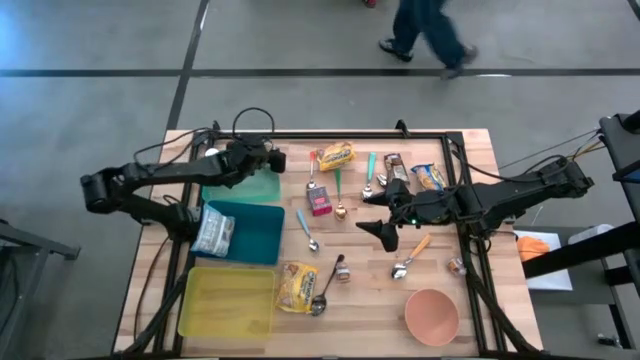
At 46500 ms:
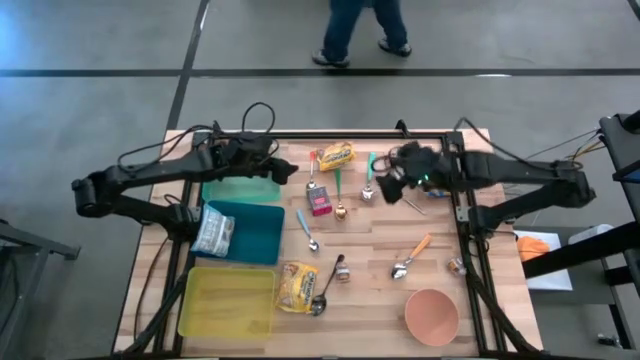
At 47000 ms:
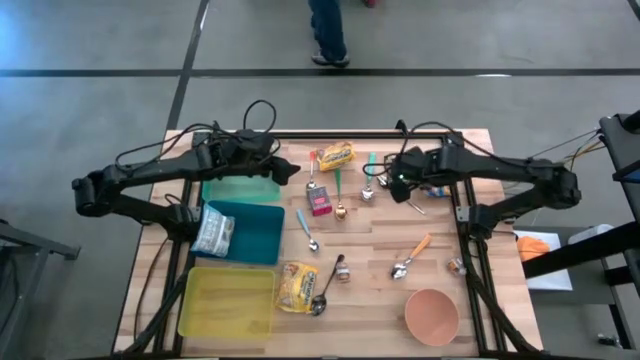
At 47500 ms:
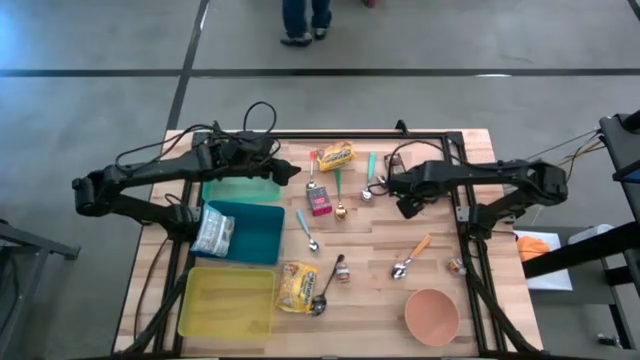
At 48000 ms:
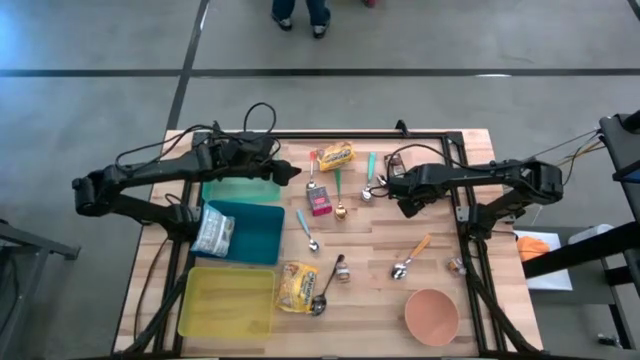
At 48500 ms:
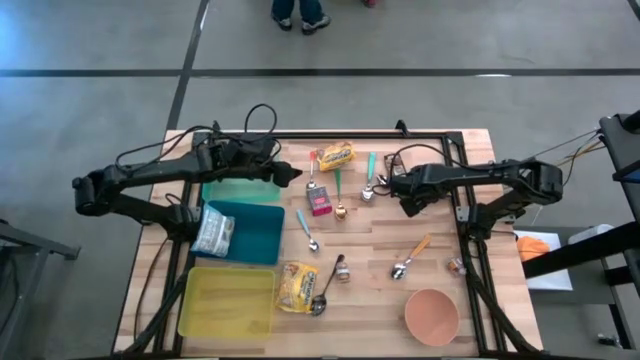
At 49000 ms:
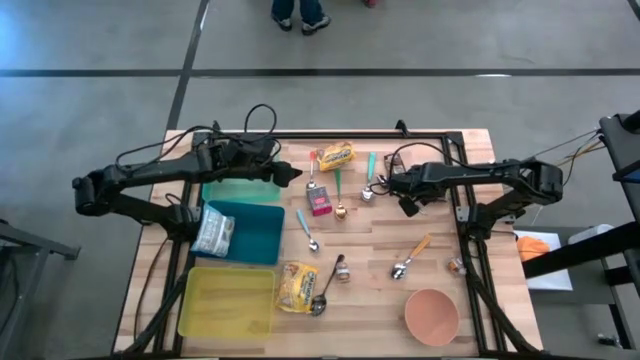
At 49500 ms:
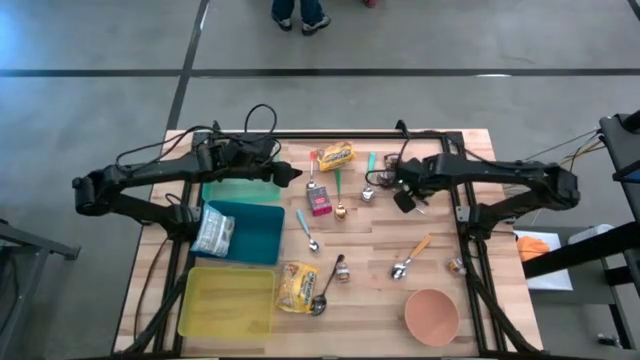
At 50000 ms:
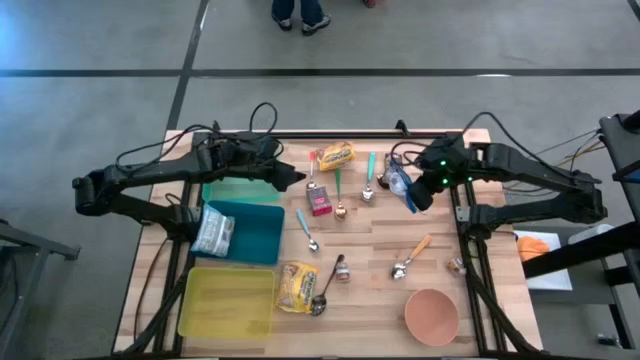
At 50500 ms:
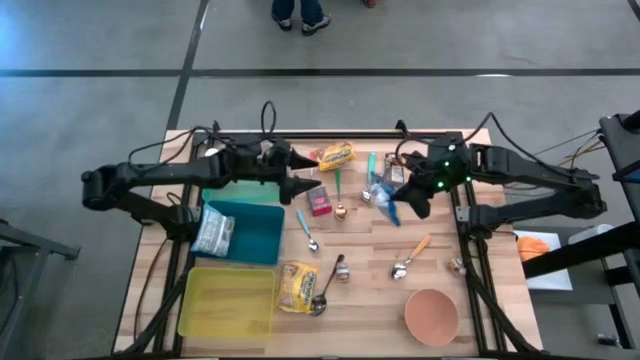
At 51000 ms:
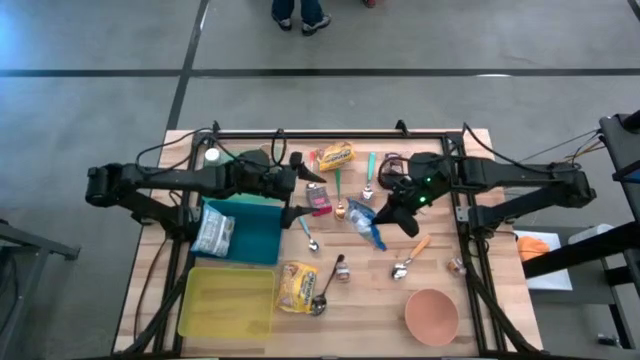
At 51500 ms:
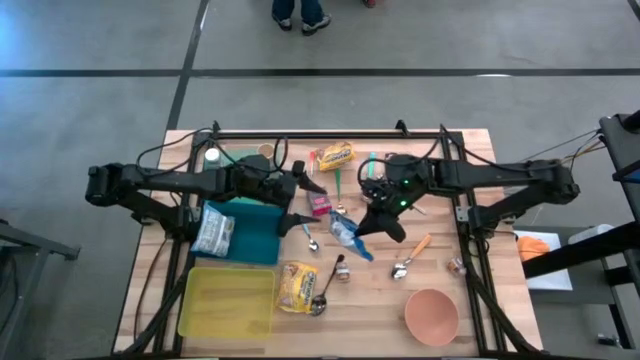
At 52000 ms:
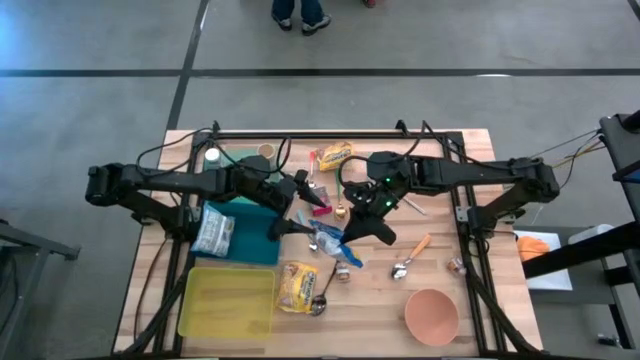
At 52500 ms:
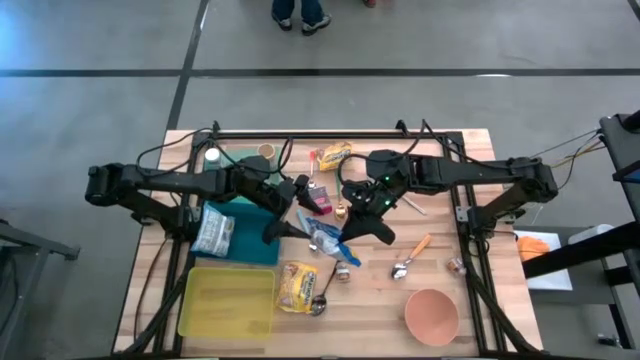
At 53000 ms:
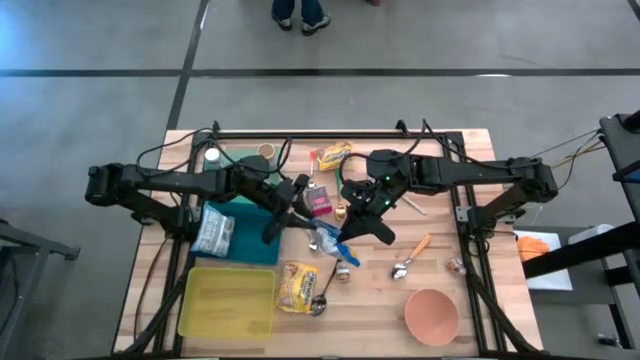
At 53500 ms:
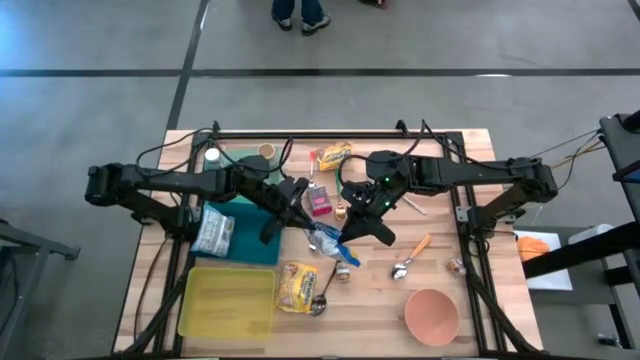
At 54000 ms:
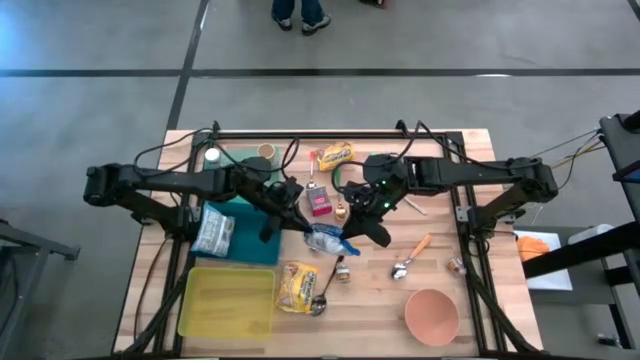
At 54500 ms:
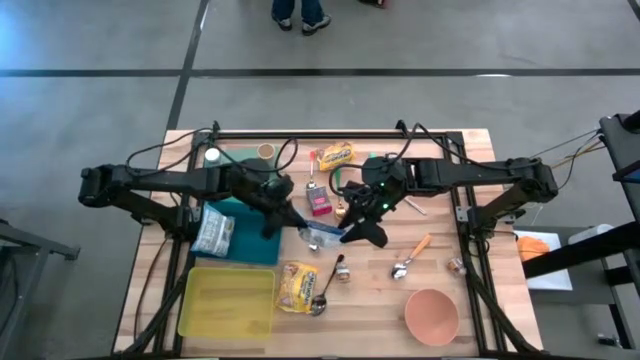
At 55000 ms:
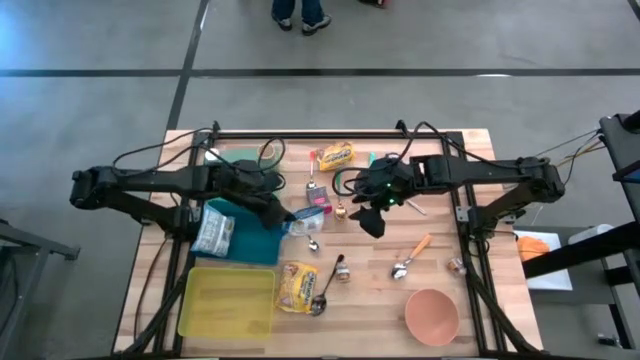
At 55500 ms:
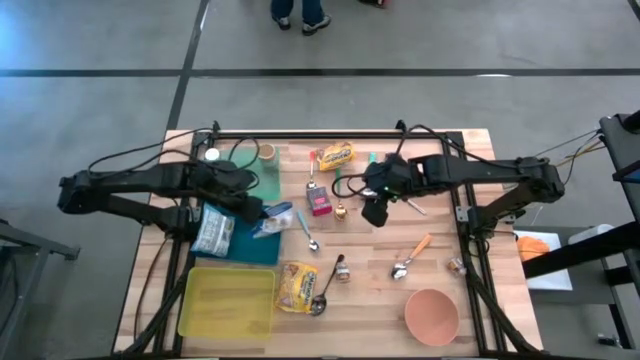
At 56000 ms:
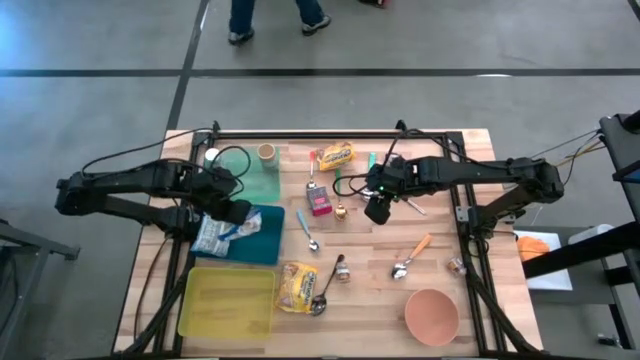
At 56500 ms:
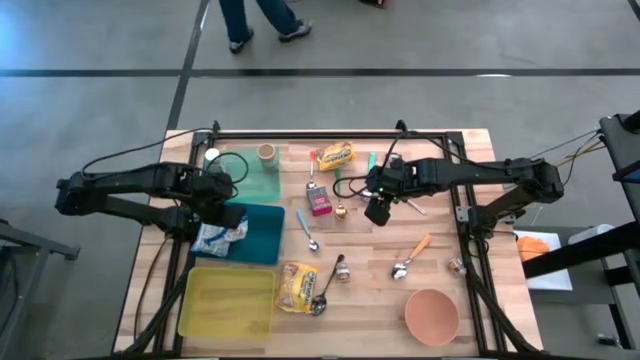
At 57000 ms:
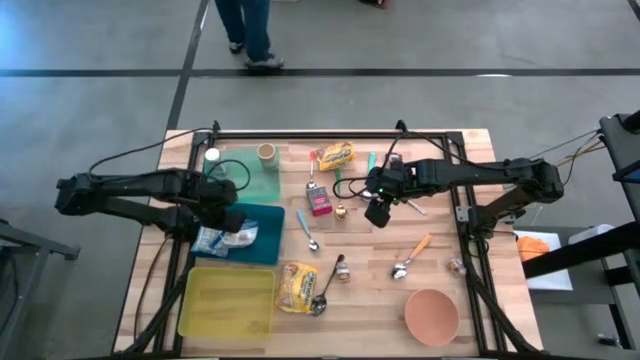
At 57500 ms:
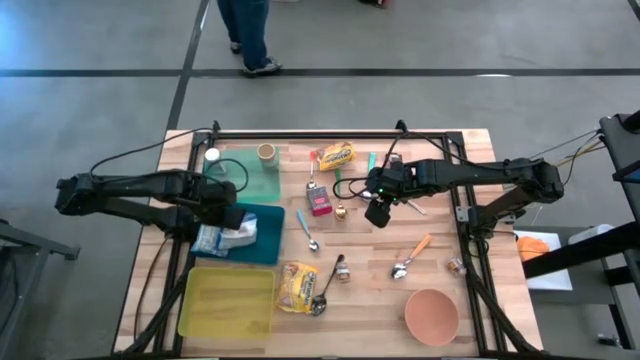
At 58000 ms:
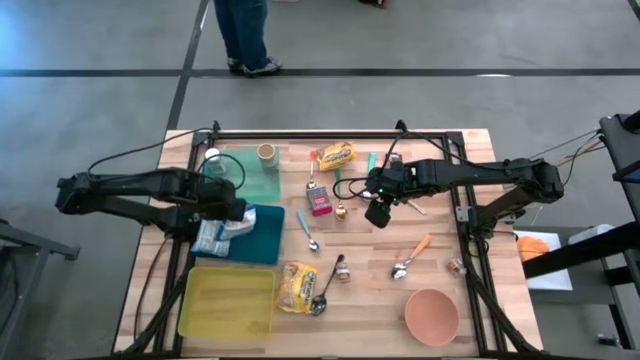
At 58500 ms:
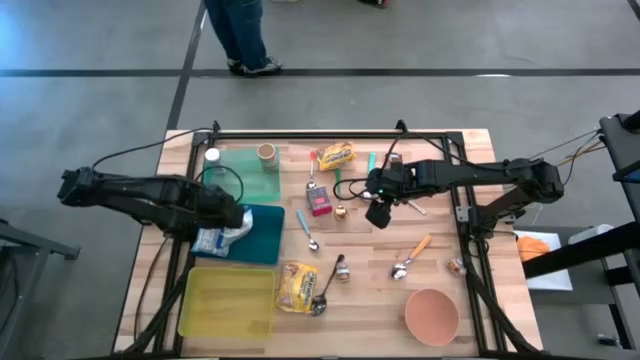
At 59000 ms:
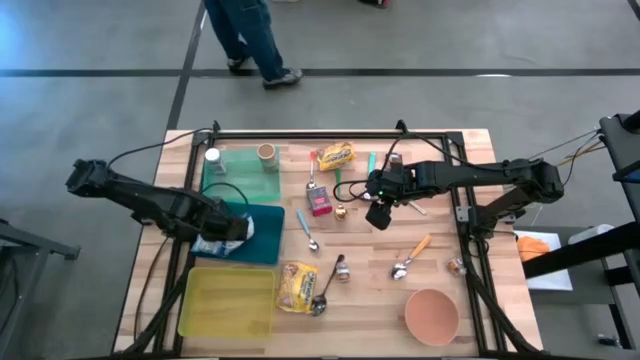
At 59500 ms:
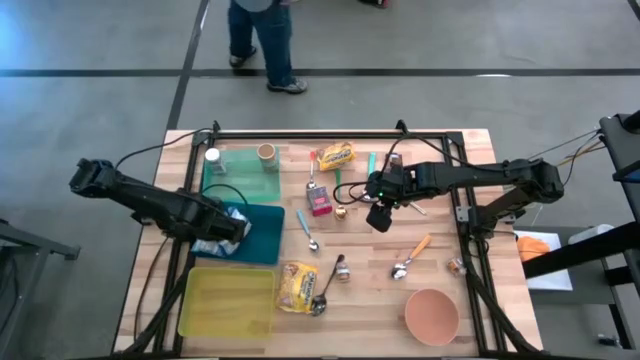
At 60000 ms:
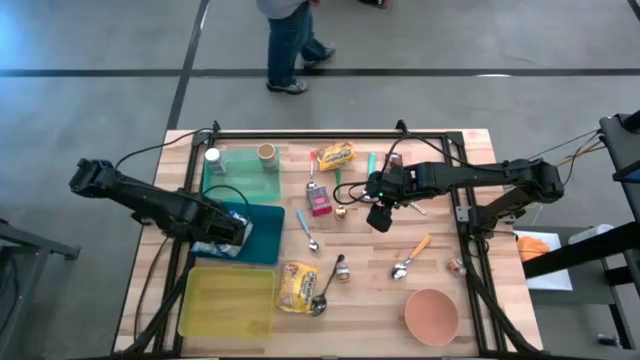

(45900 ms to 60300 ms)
Put the blue noodle pack into the dark blue bin

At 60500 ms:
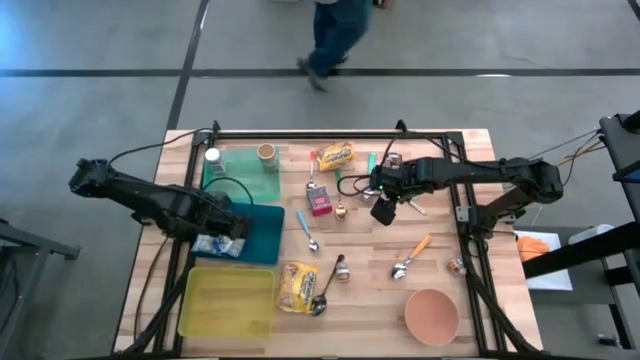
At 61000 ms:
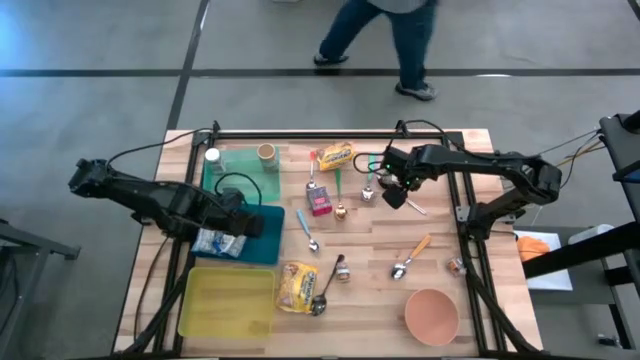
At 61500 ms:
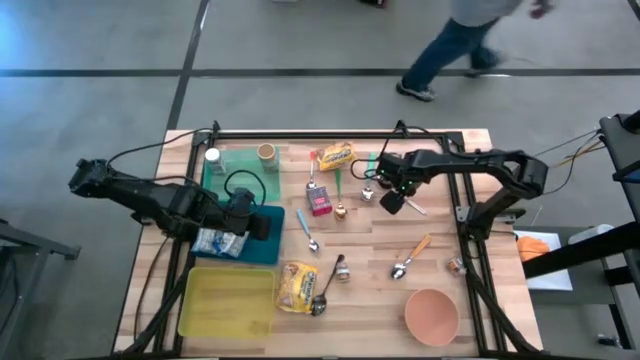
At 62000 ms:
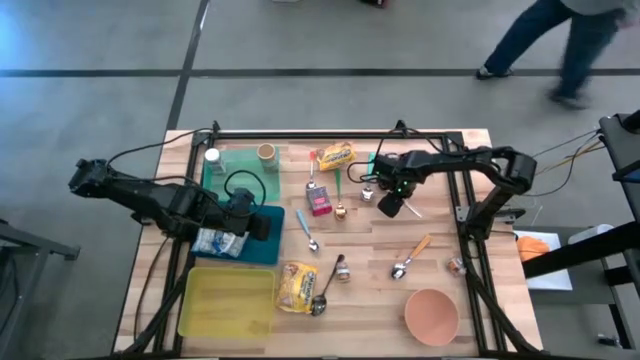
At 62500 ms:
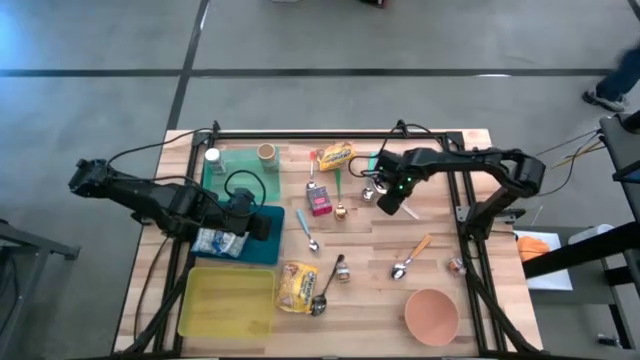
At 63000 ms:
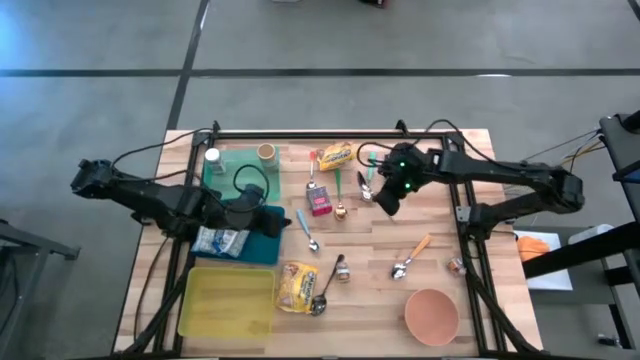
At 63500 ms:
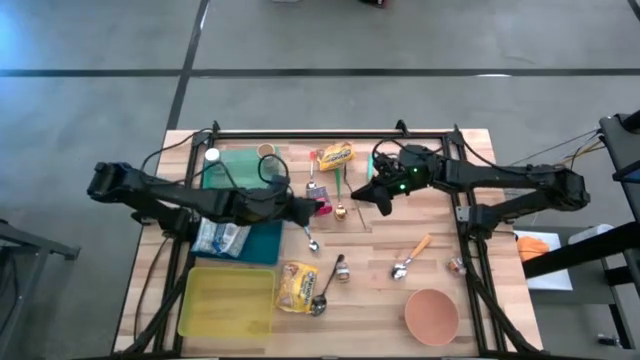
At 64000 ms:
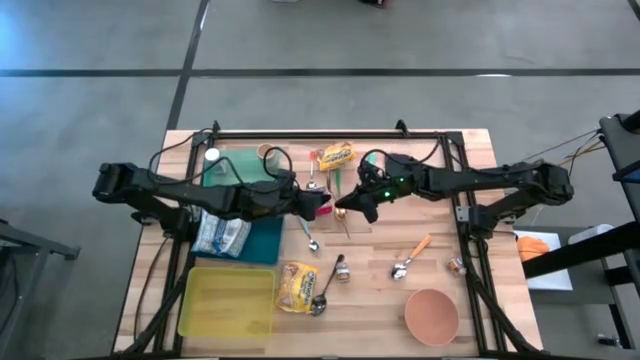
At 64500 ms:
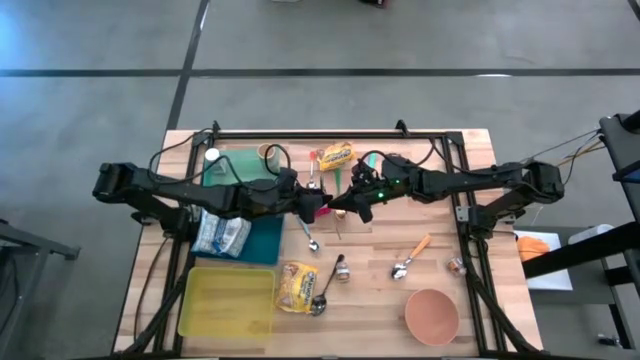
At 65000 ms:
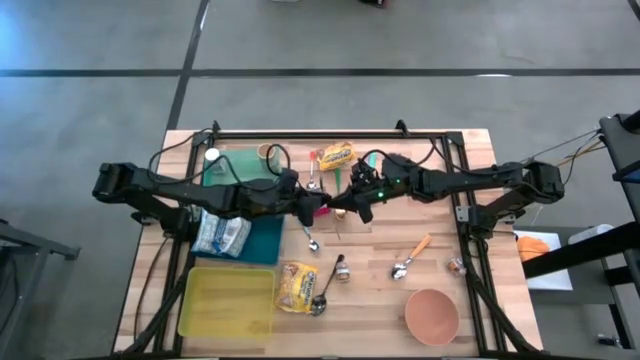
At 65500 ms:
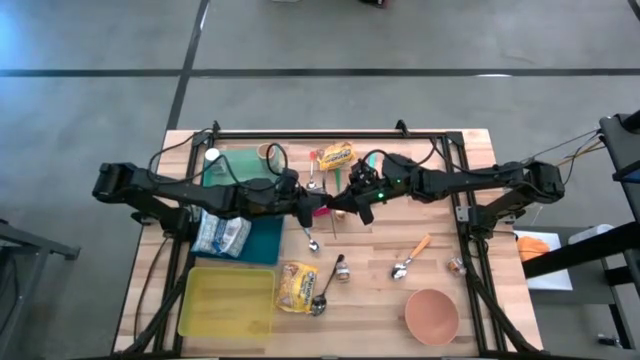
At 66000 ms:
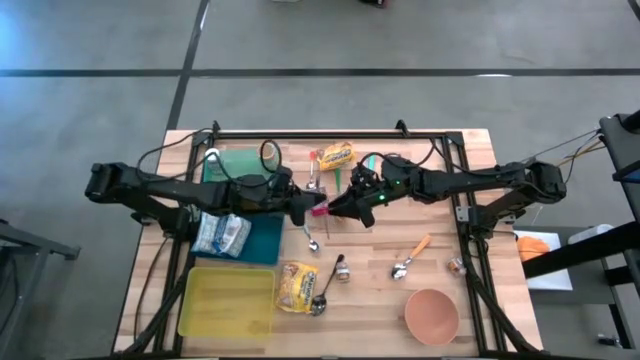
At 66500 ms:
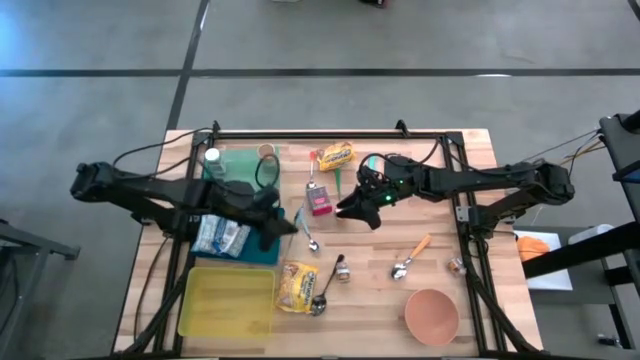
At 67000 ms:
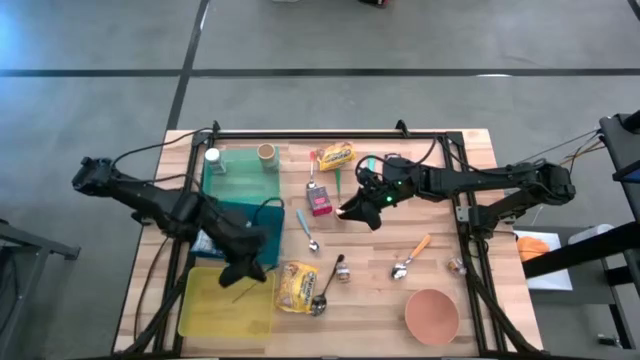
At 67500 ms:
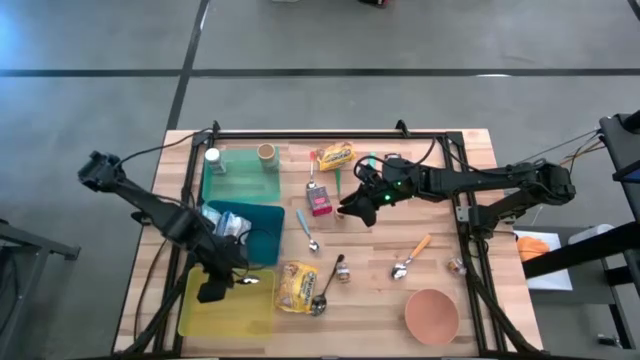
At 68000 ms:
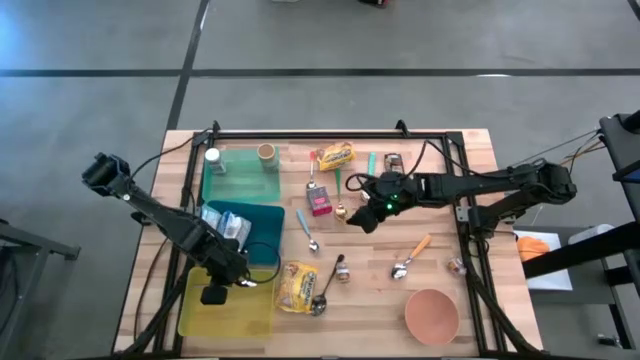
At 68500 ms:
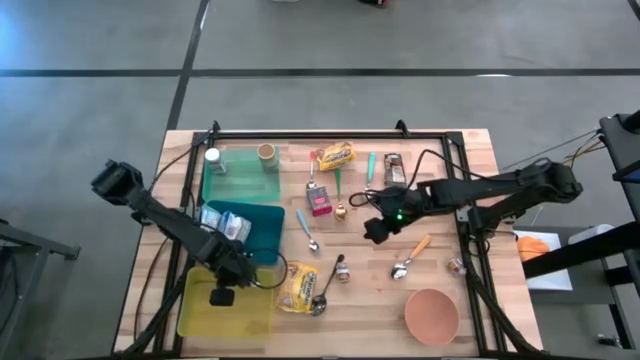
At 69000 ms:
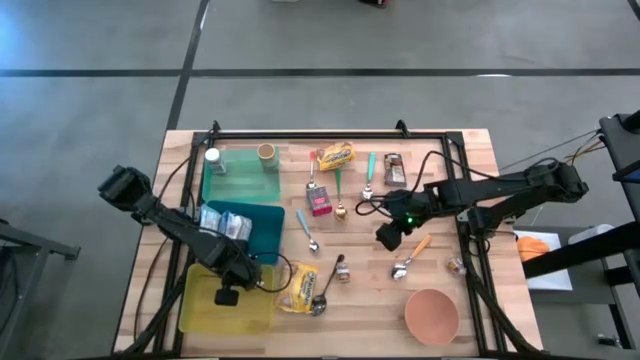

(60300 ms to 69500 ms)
Put the silver spoon into the yellow bin
